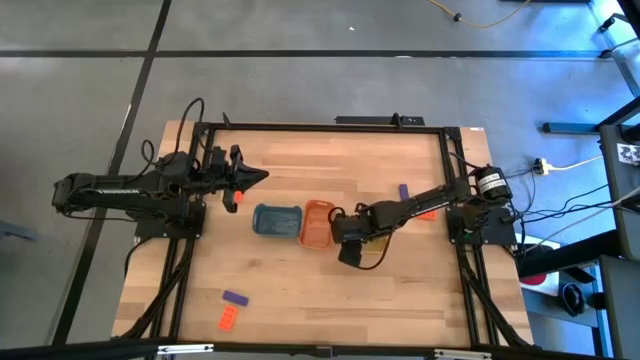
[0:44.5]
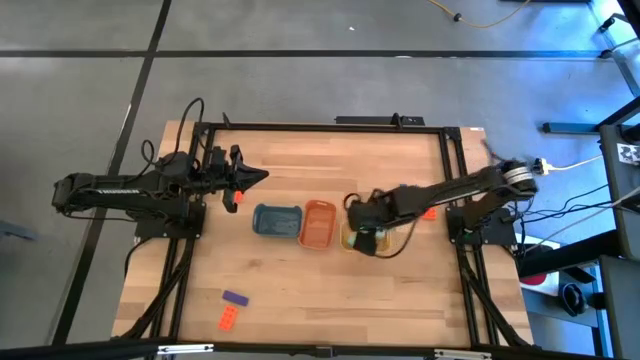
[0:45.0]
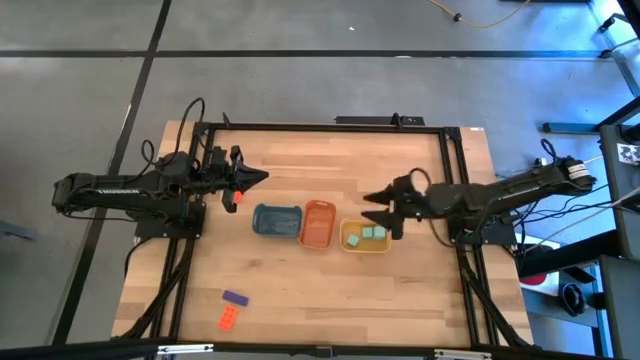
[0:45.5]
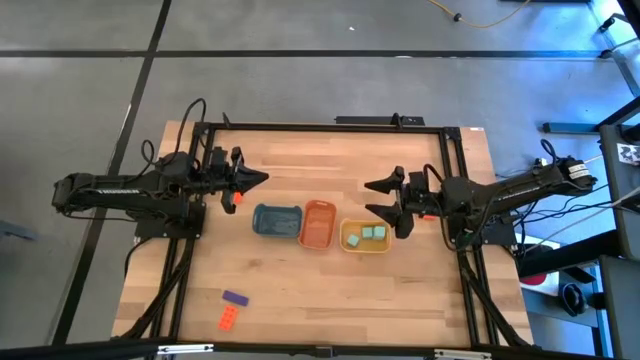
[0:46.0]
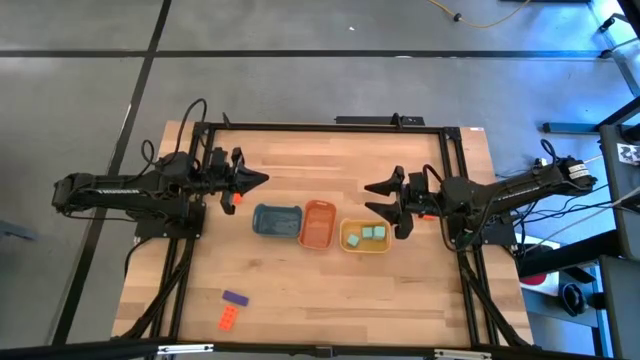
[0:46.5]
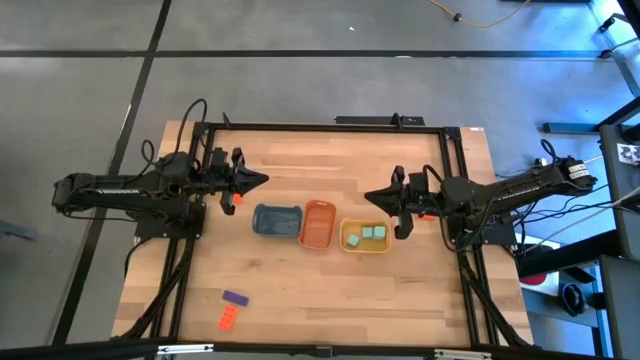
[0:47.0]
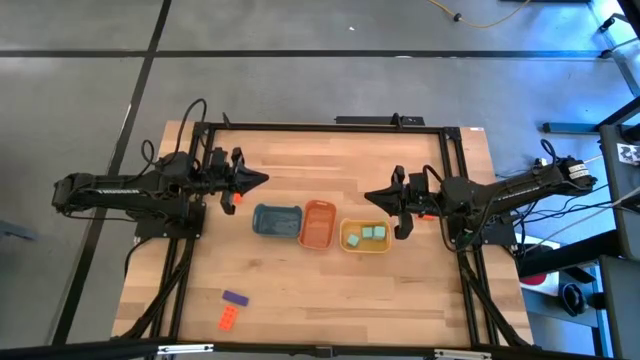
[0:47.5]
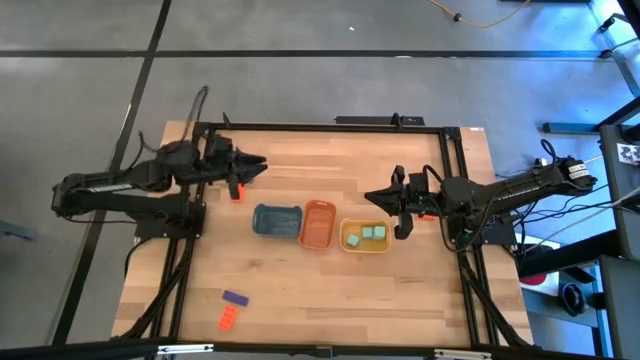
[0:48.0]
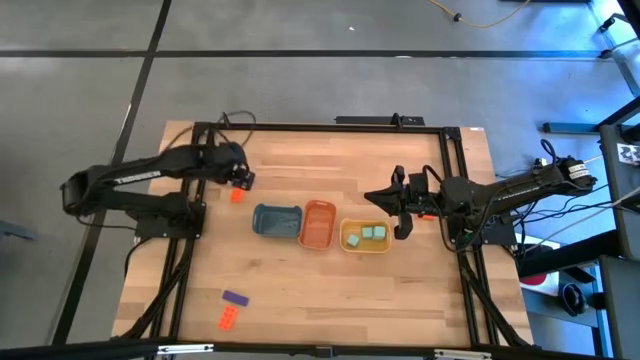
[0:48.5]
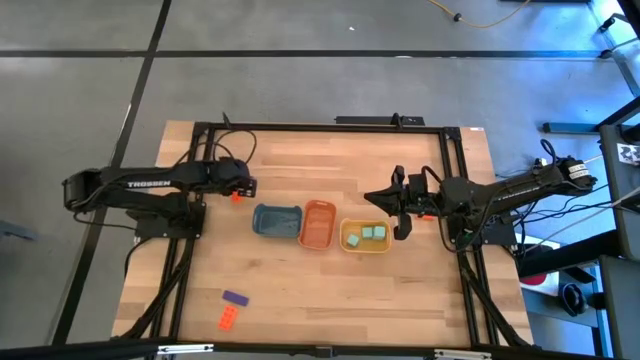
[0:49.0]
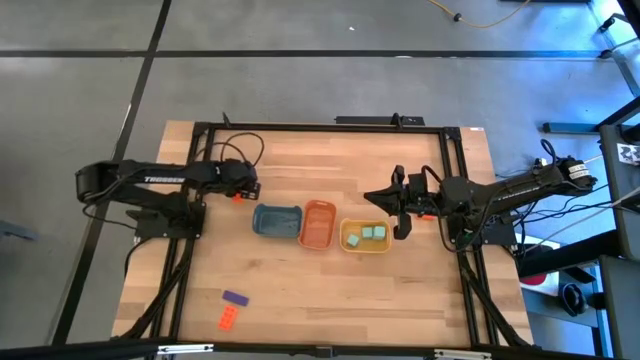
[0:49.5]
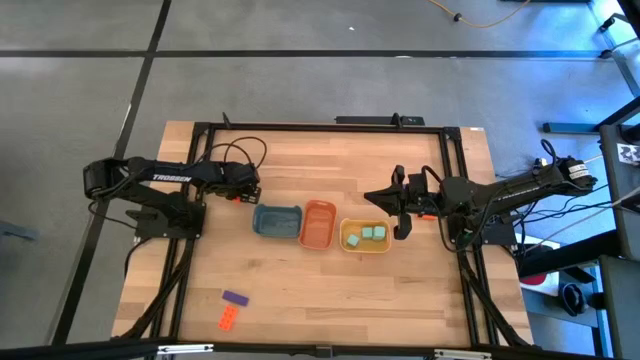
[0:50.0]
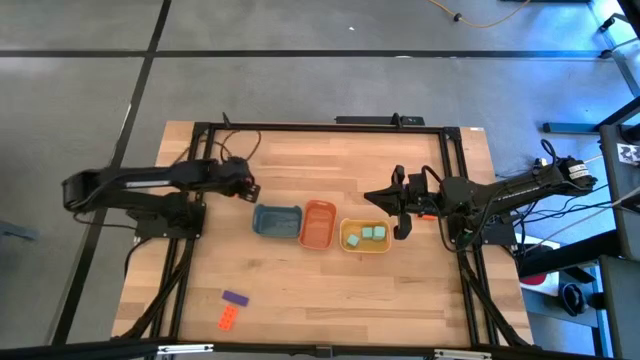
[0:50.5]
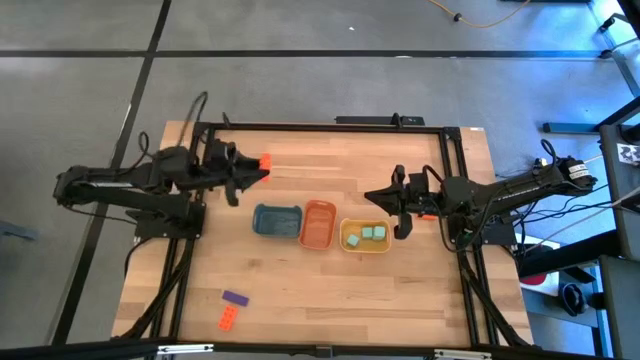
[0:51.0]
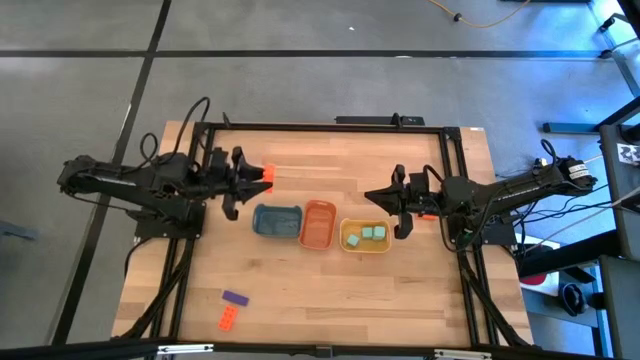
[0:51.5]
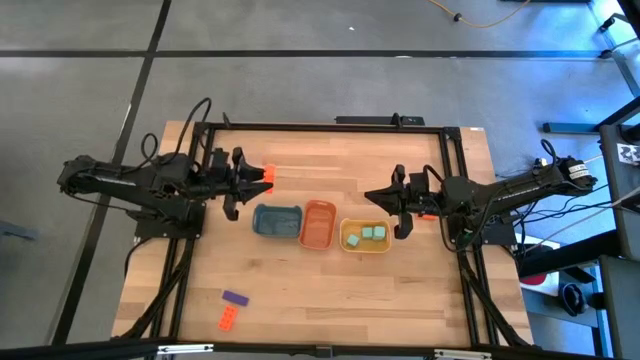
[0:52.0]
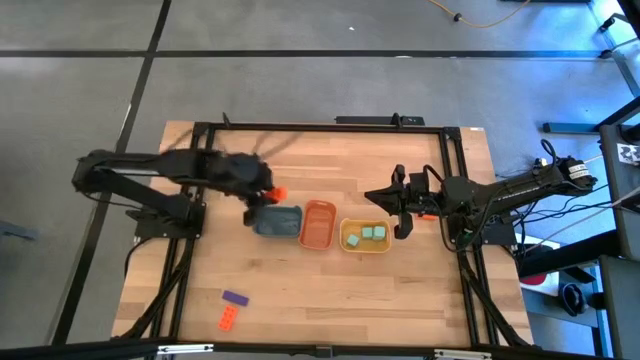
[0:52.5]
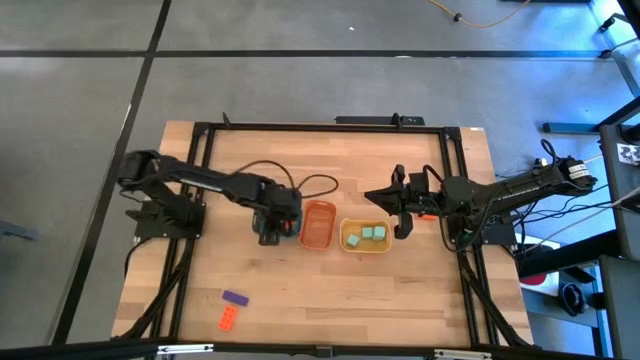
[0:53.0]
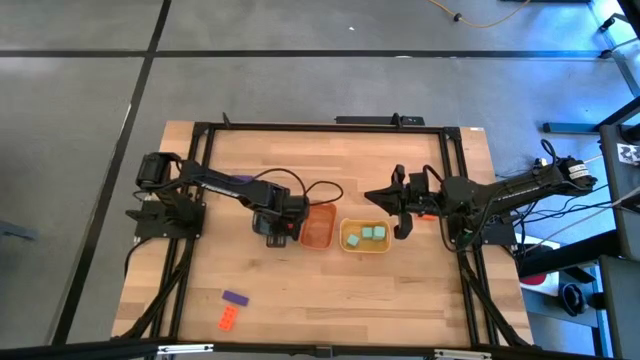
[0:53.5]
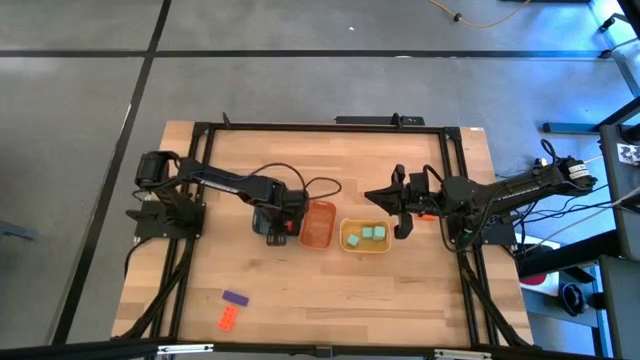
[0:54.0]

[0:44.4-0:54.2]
Task: Sort & place blocks by color
Put the top left orange rectangular block into the blue bin

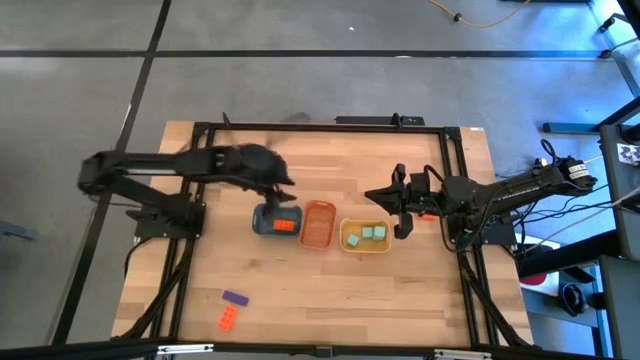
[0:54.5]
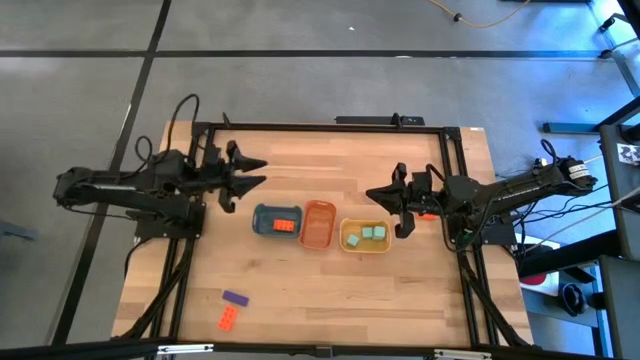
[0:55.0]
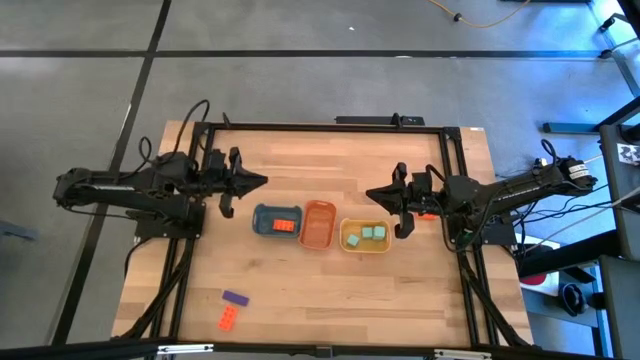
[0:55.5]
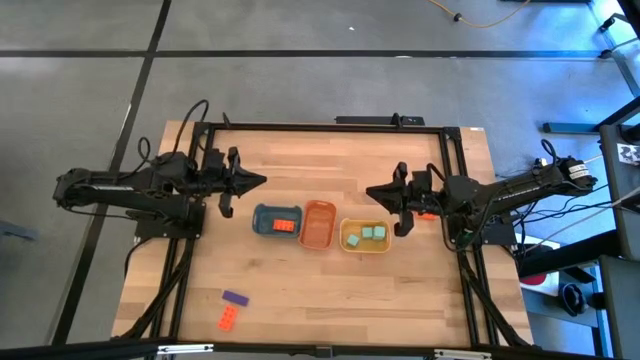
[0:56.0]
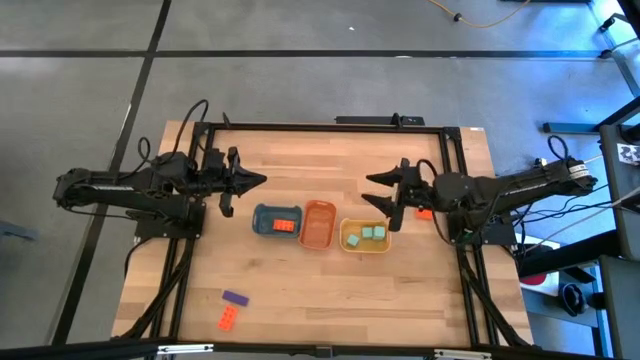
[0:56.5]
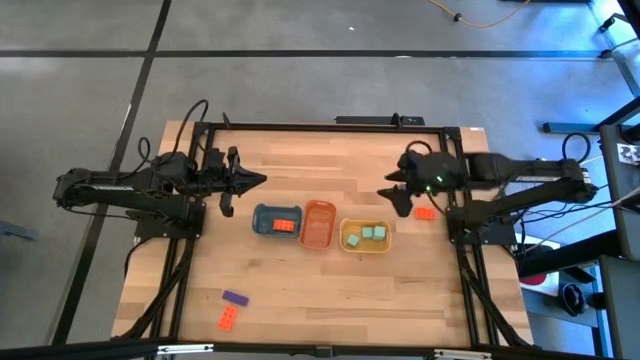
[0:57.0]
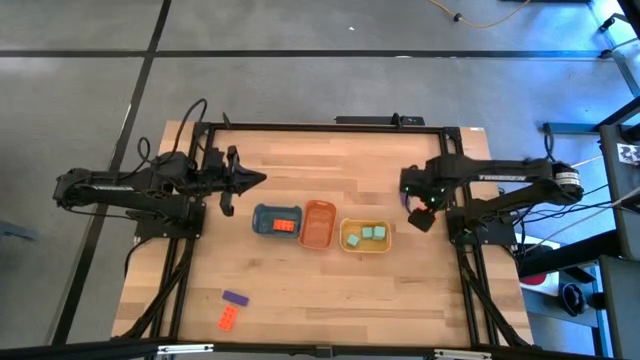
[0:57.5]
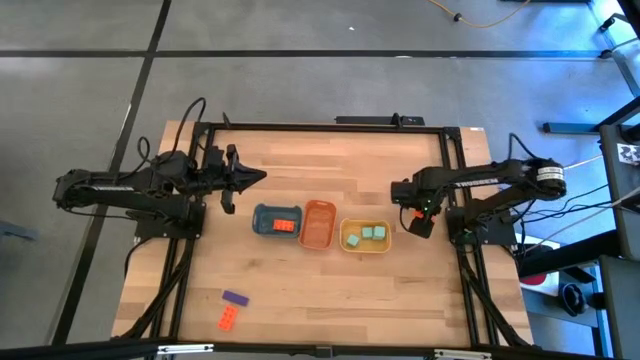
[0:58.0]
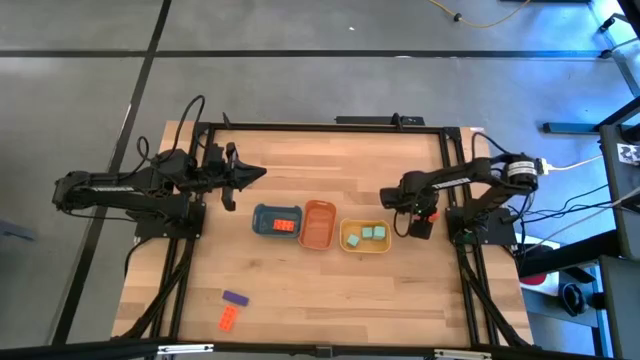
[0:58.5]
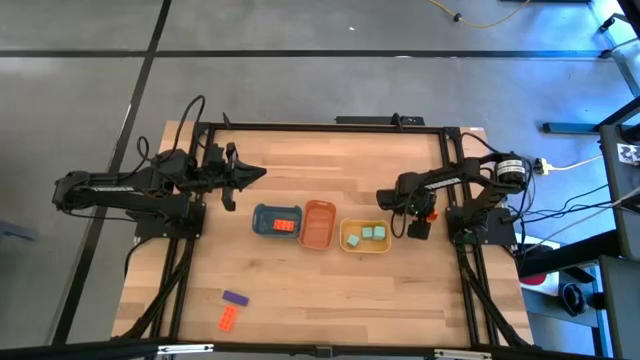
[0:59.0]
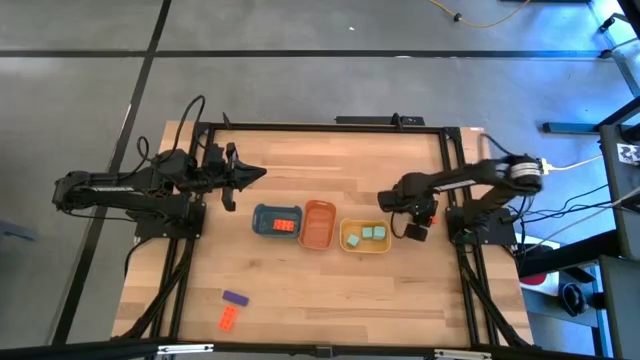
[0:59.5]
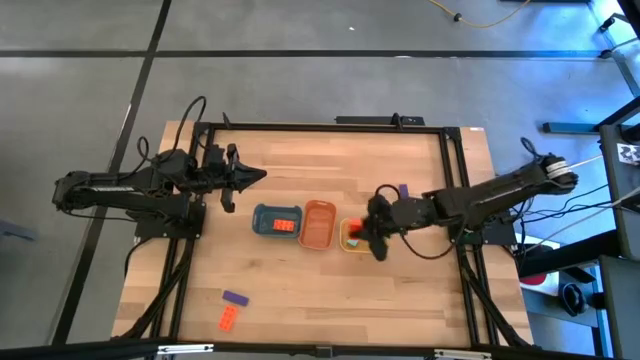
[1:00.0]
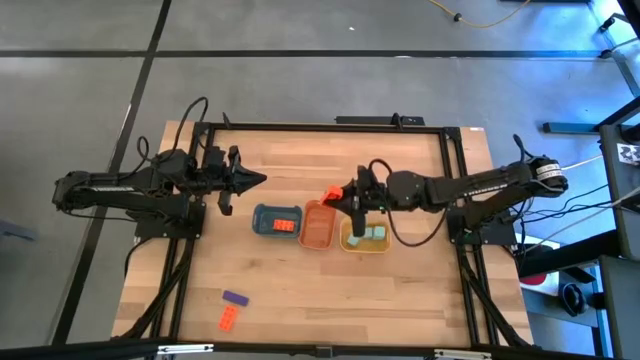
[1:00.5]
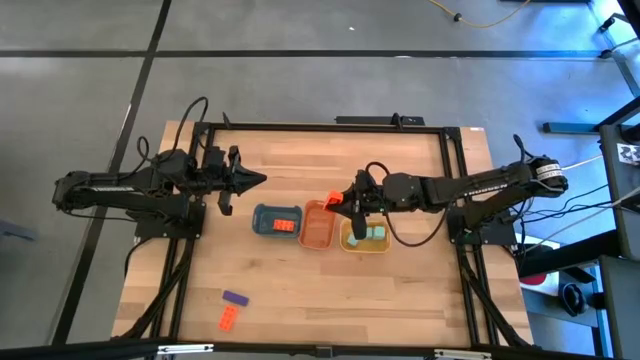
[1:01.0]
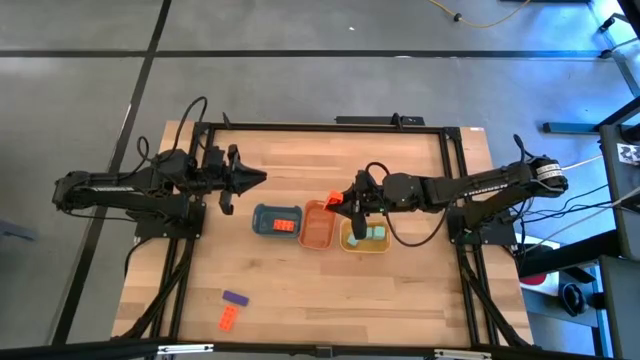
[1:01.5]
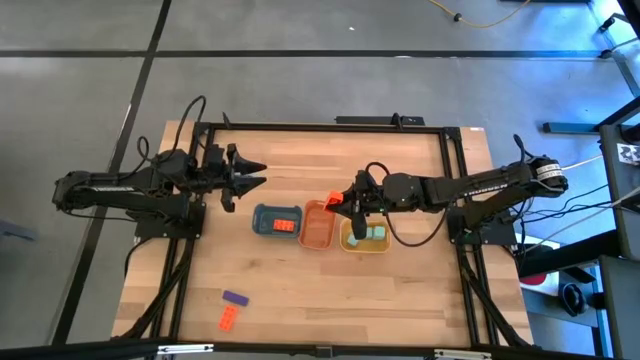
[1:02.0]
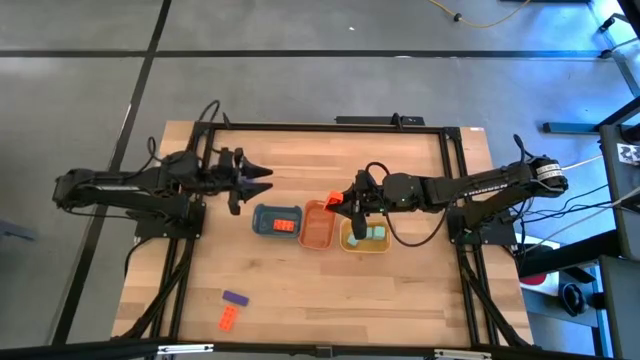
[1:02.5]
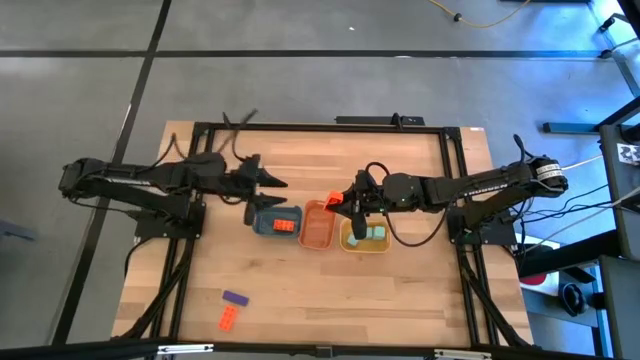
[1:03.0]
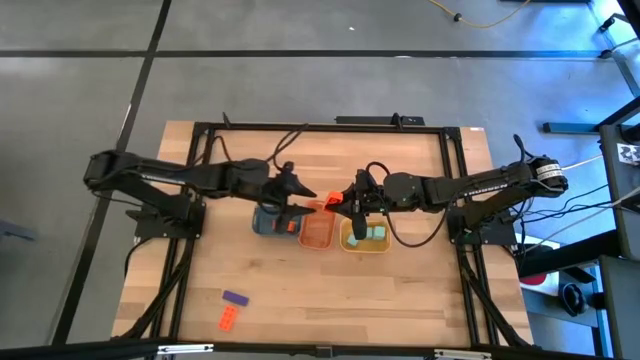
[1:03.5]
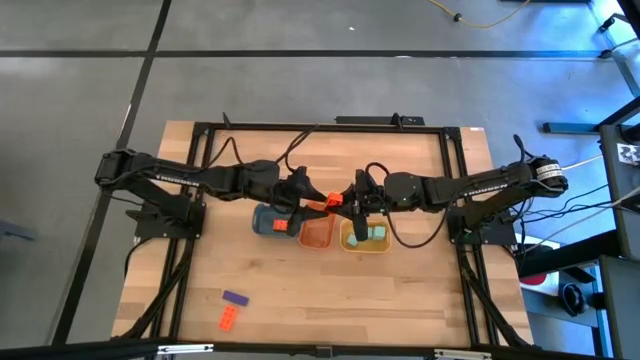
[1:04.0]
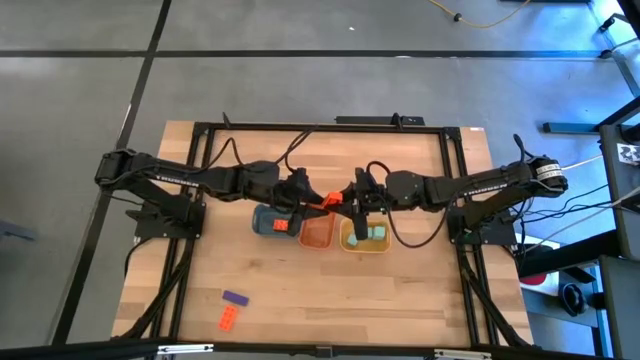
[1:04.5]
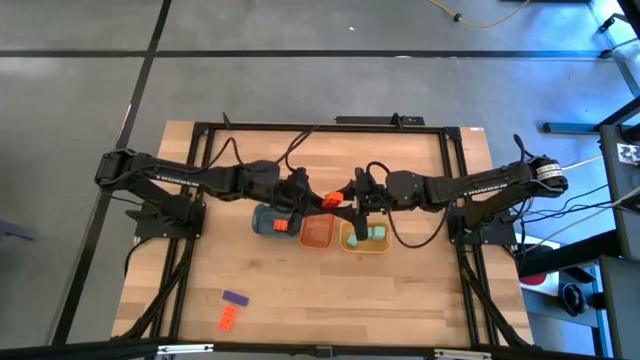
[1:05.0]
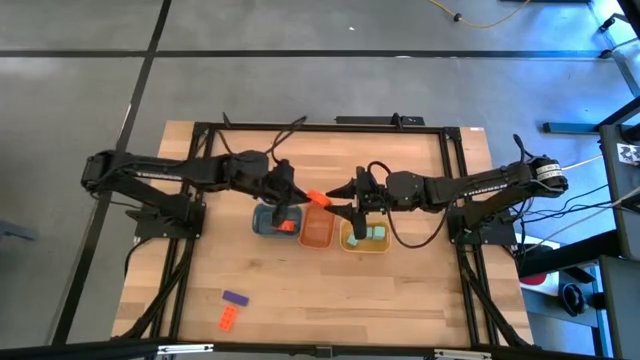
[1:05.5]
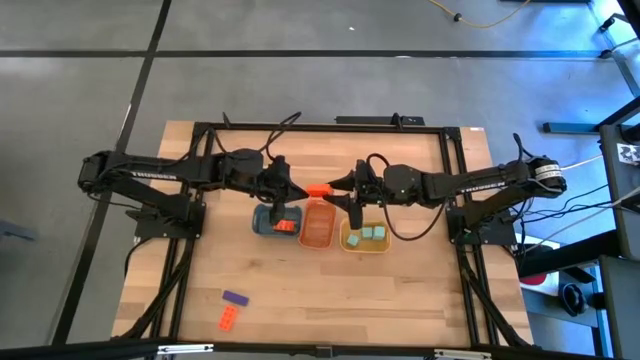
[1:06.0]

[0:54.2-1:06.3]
Put the right orange rectangular block into the blue bin
